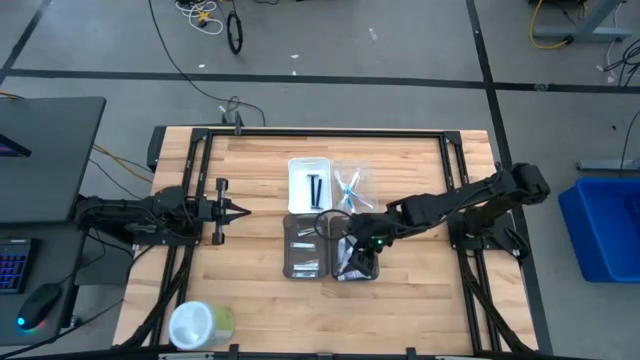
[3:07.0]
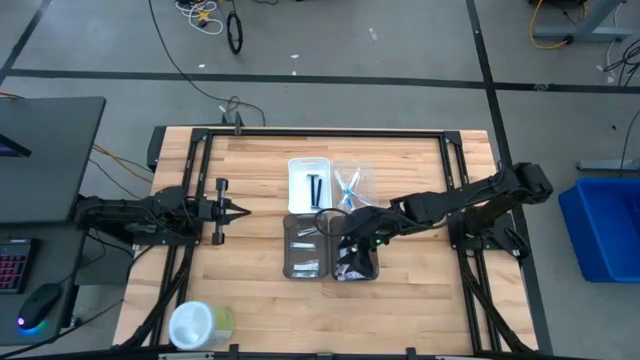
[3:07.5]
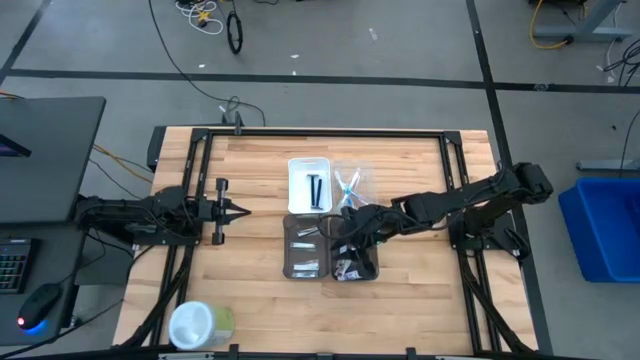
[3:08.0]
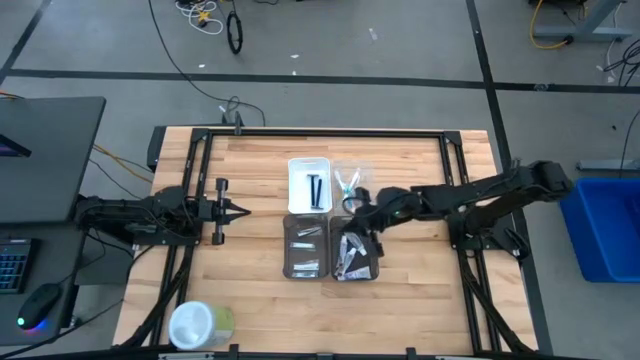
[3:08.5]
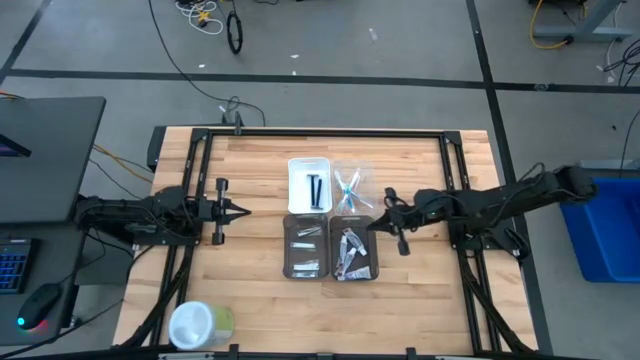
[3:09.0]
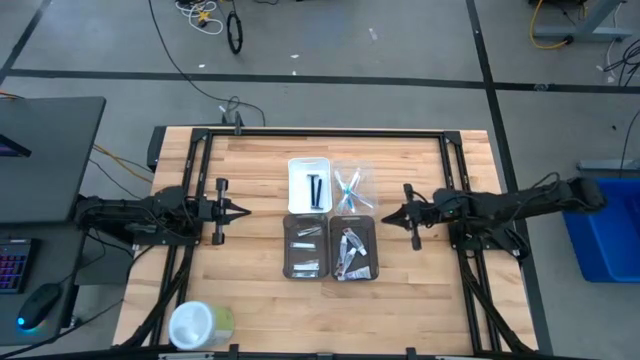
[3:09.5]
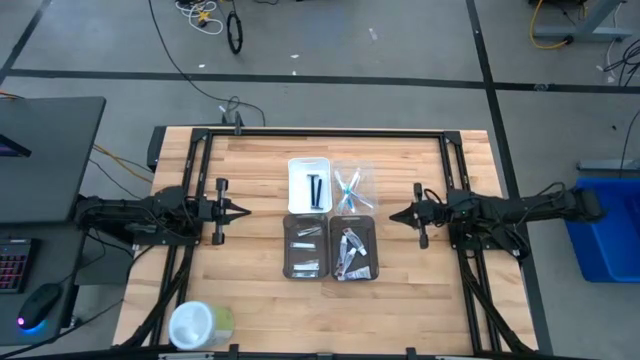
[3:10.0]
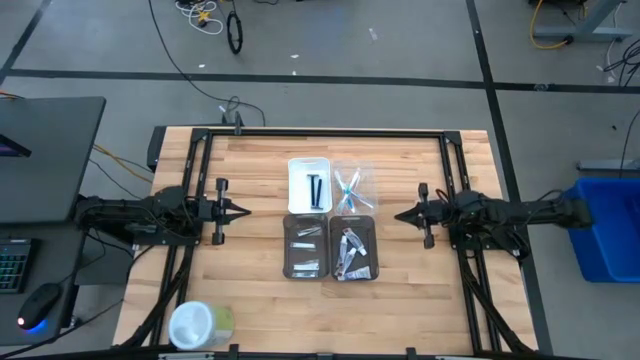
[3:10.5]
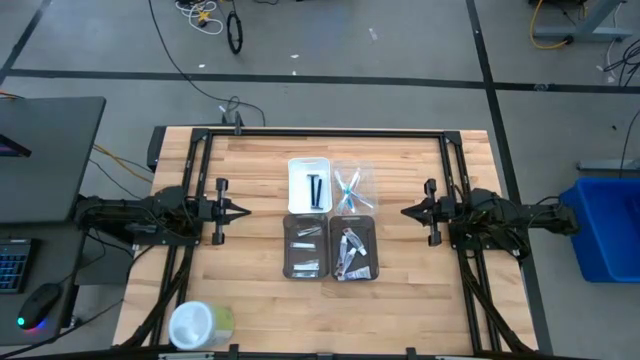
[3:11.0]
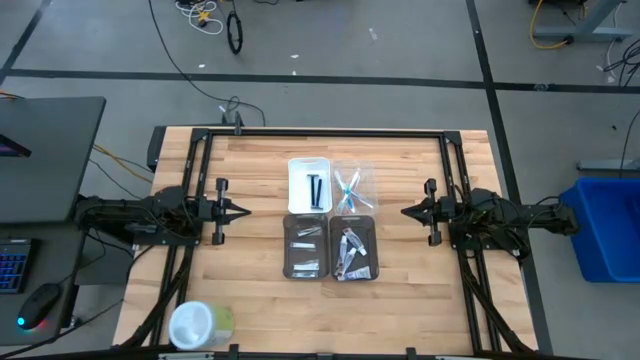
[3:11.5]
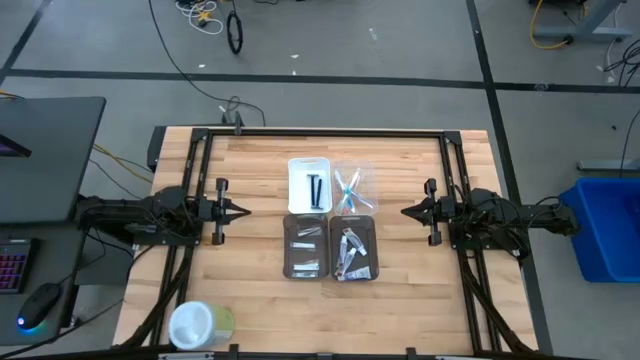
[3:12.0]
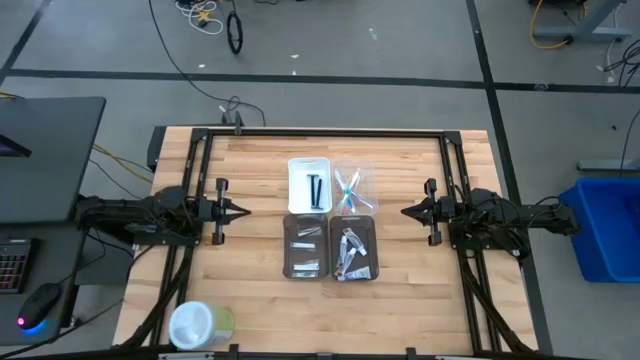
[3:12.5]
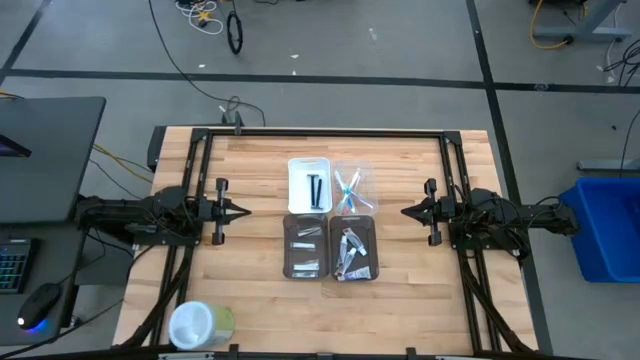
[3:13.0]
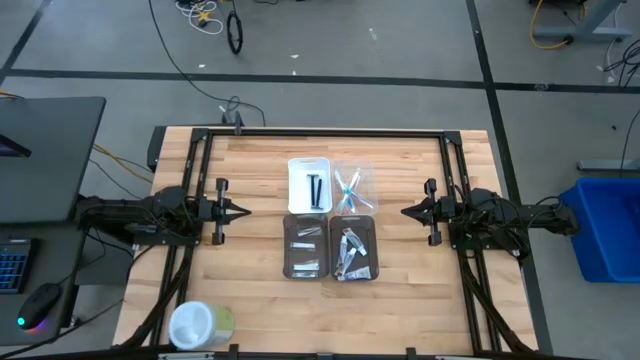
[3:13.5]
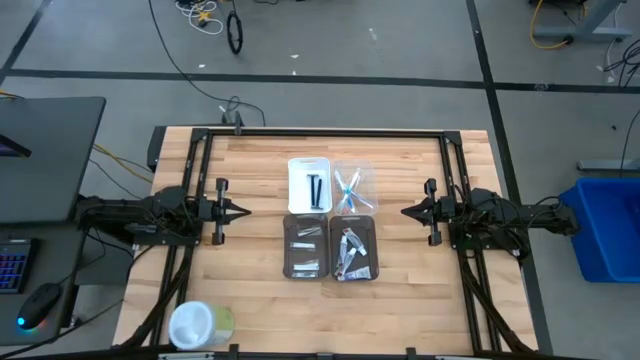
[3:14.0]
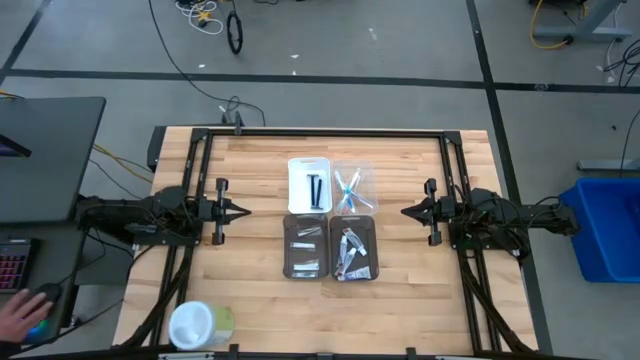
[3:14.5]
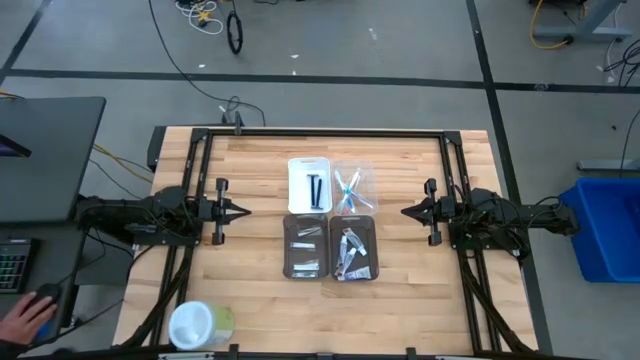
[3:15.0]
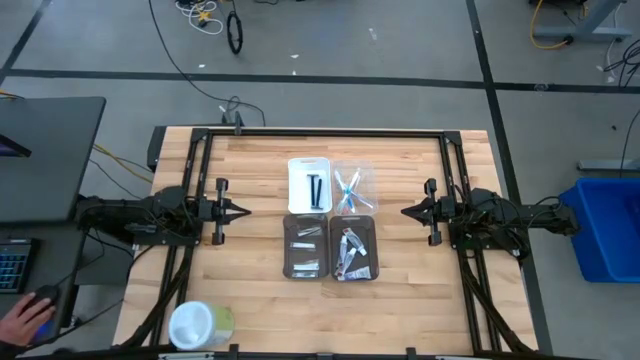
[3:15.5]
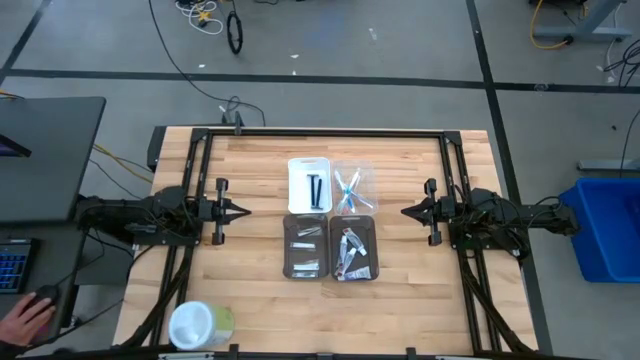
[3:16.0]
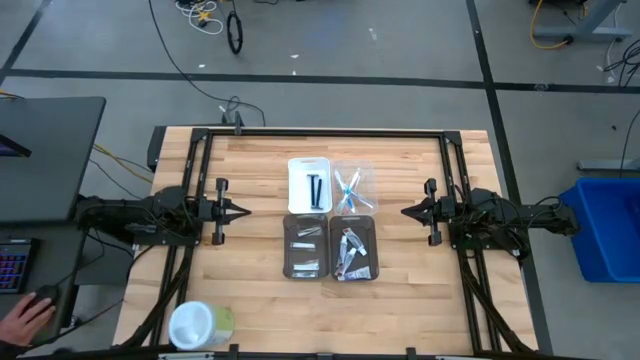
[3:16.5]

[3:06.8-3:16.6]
Task: Pick & Place Travel size toiletries
Return to Home Position

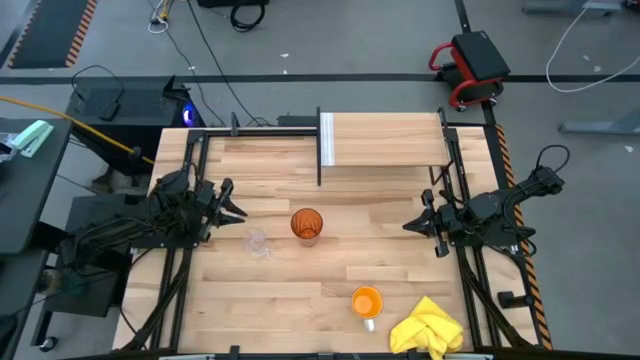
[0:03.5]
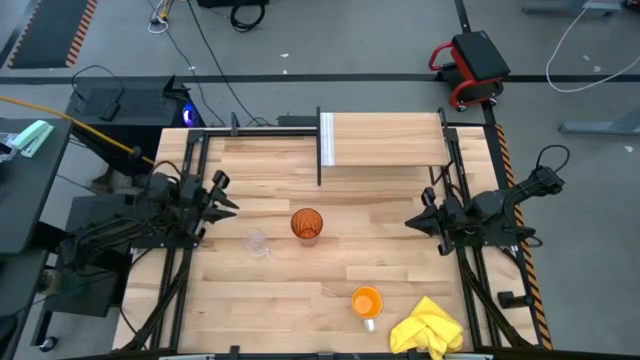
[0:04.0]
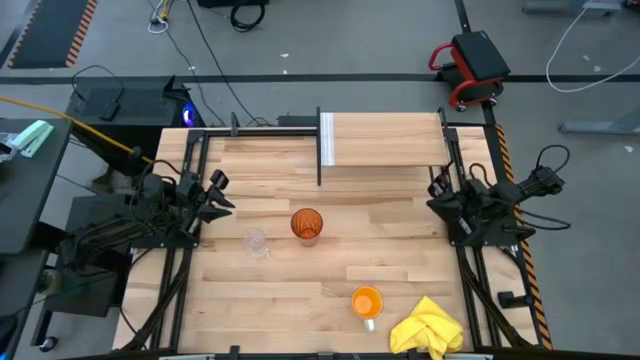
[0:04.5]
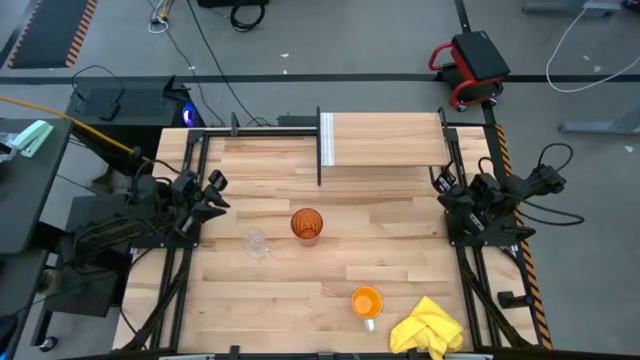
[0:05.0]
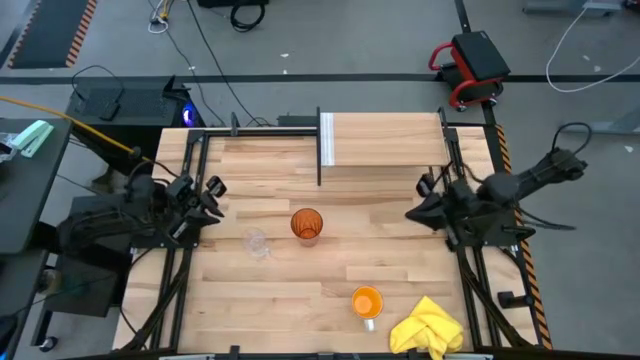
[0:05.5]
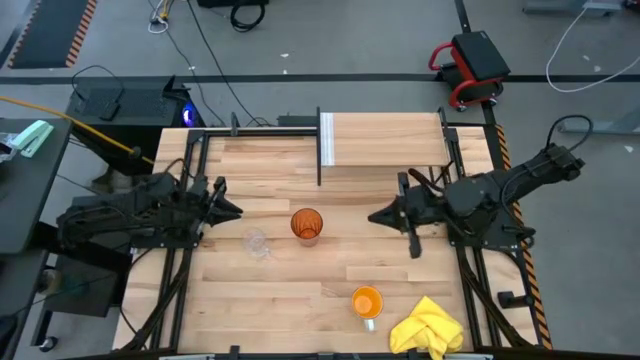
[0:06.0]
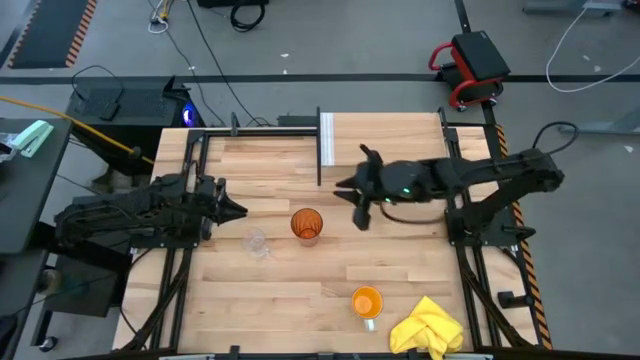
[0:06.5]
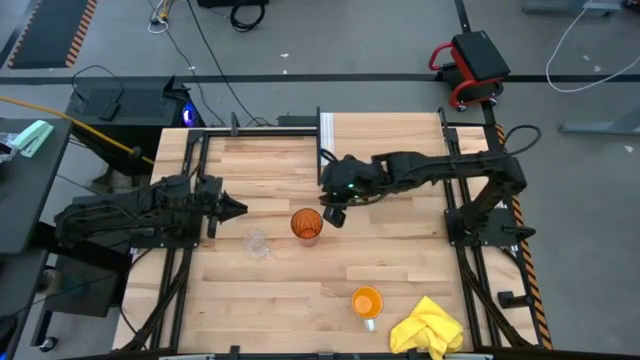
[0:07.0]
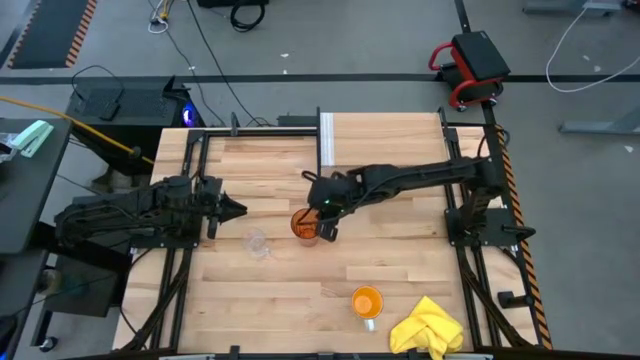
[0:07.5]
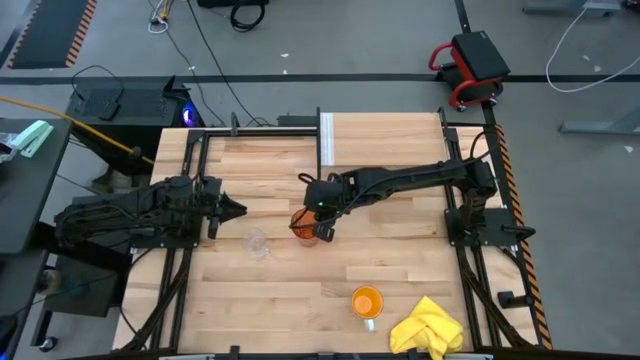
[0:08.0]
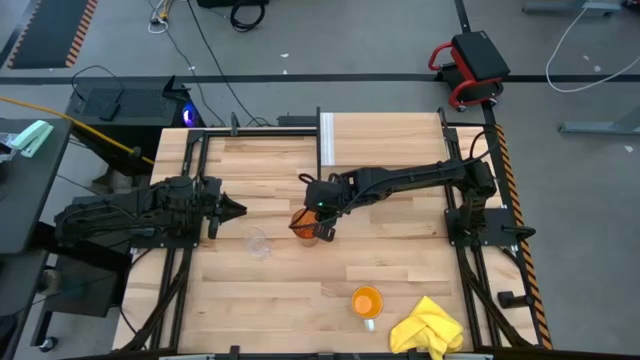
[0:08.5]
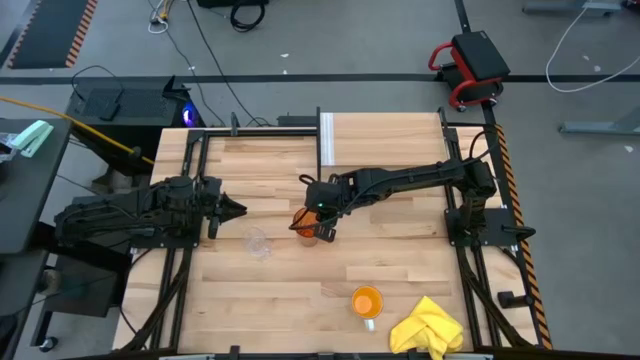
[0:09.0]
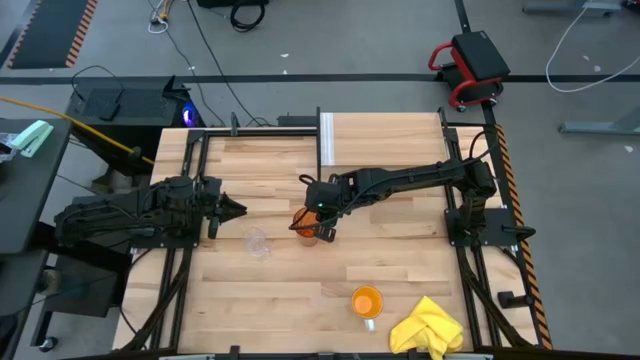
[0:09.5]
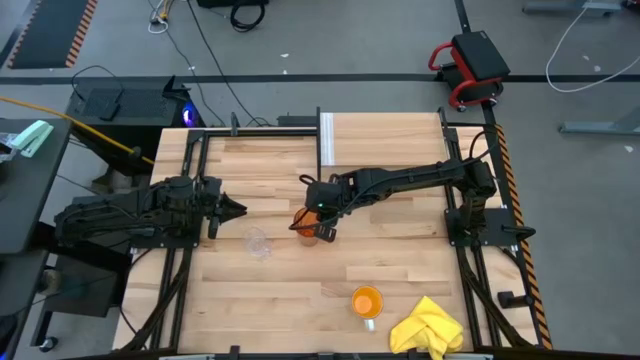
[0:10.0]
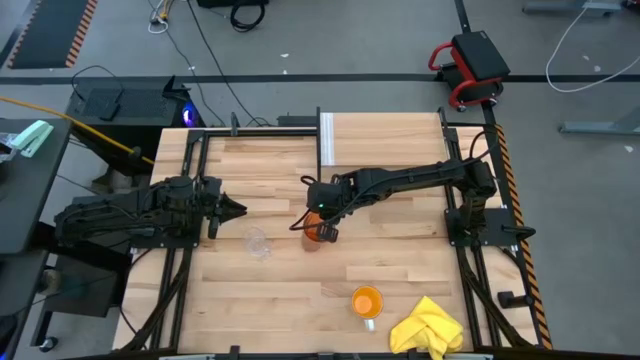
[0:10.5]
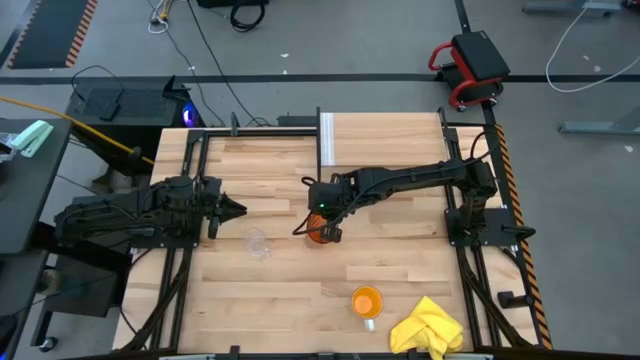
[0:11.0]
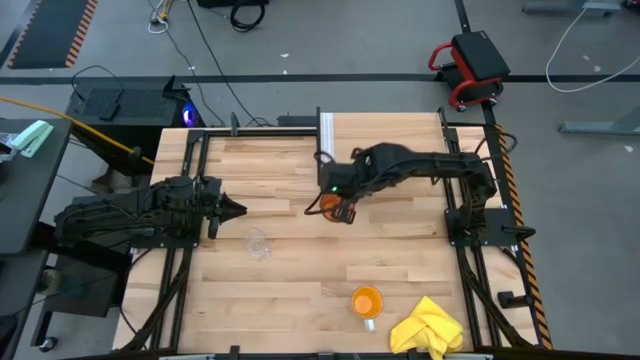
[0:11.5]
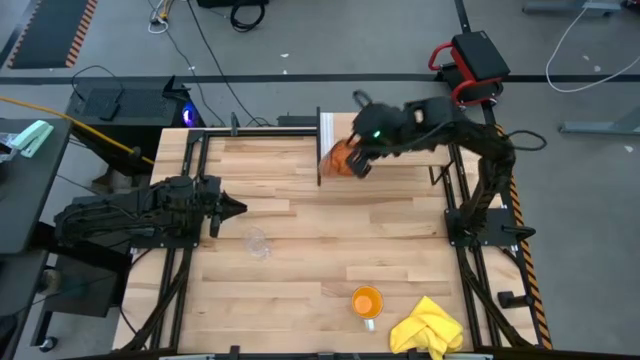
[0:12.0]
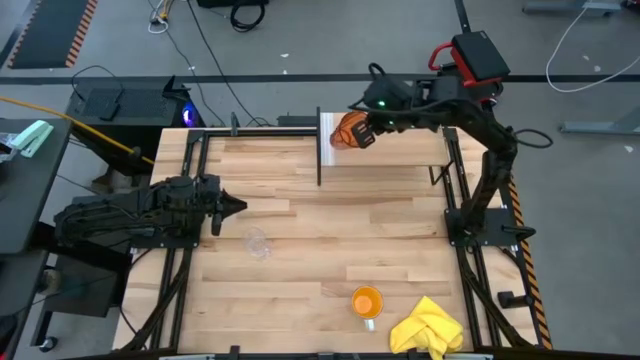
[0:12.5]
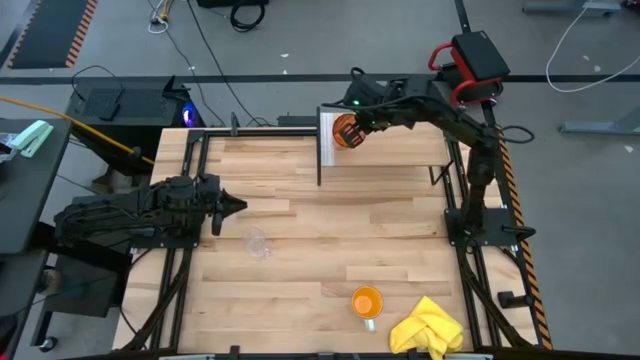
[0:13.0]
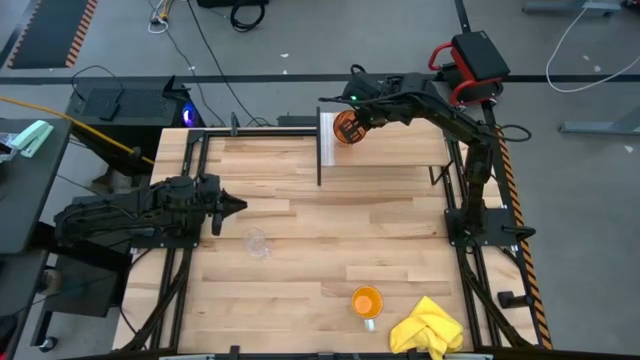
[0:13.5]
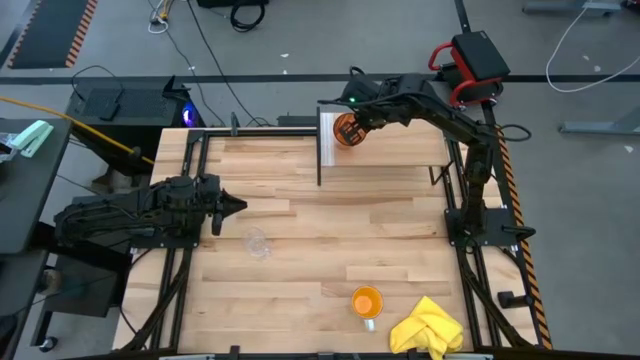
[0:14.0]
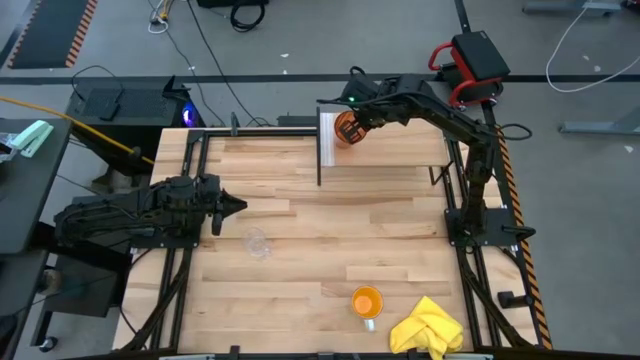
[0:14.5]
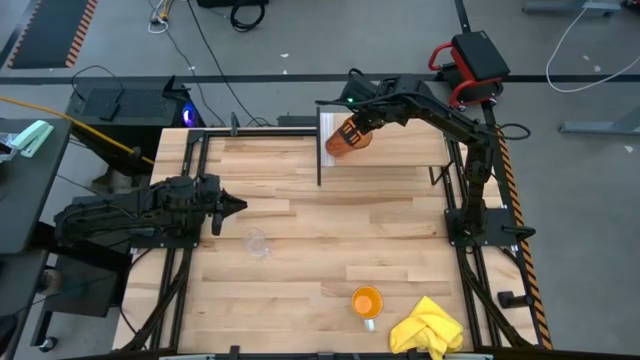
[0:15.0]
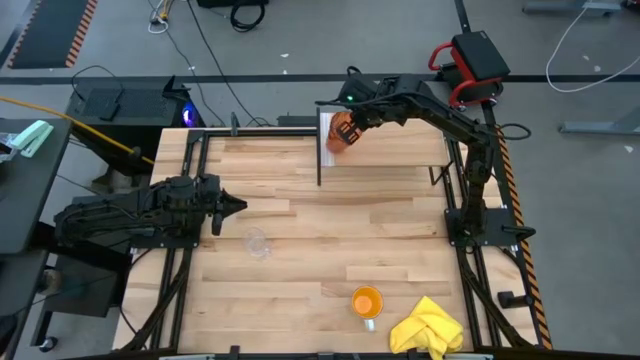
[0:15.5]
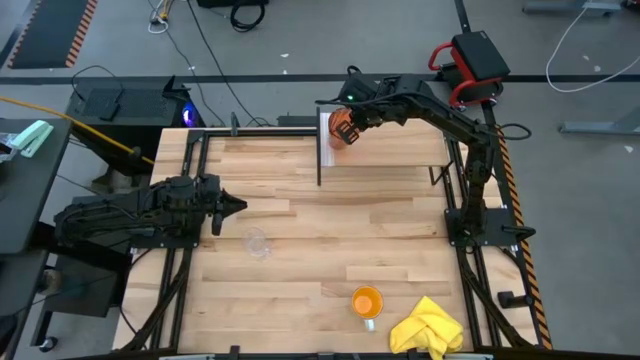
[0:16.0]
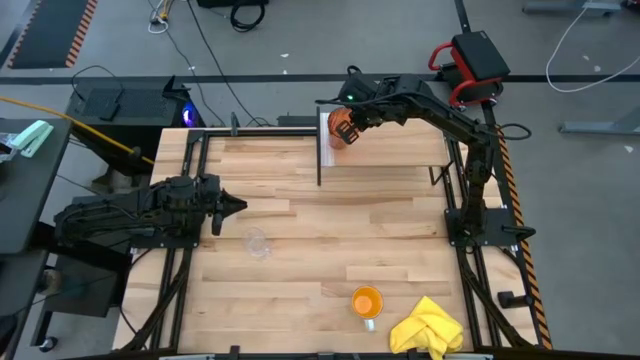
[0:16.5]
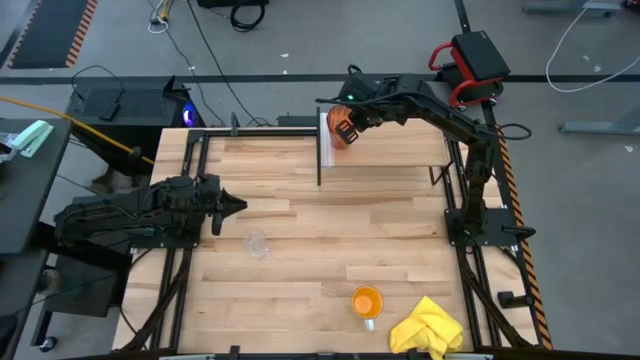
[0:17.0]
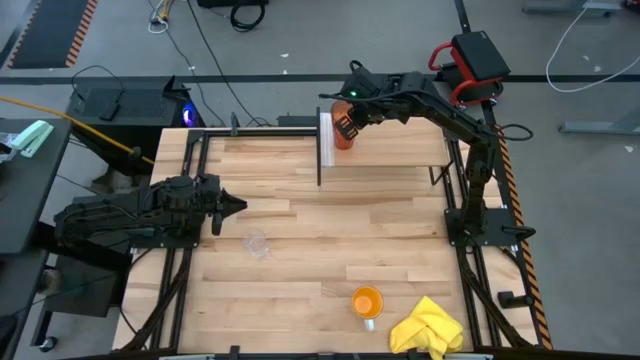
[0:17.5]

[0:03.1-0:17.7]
Task: Stack small to large cups/mugs on shelf
Put the orange cup on the shelf
